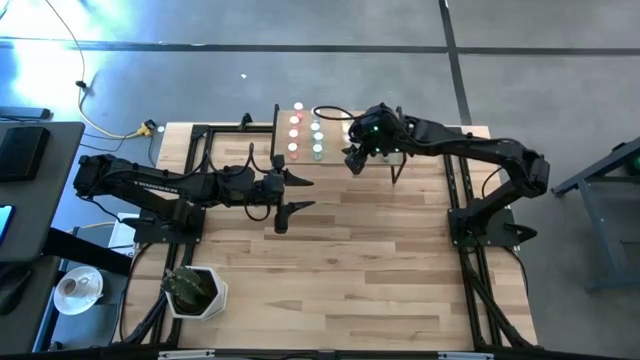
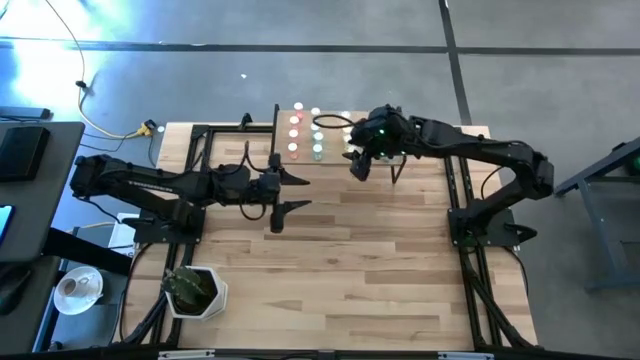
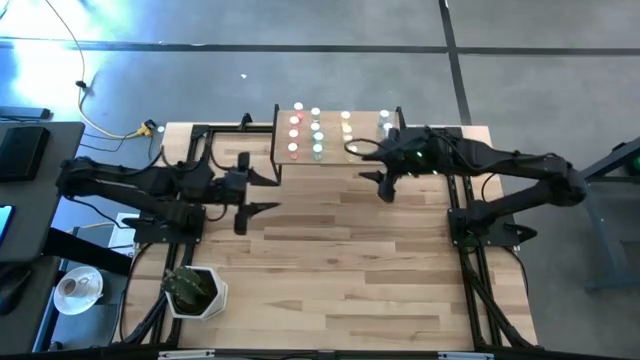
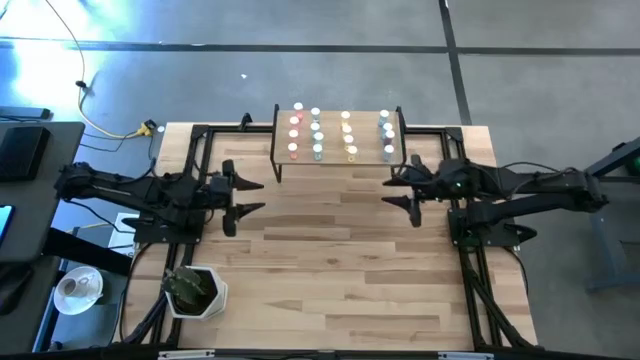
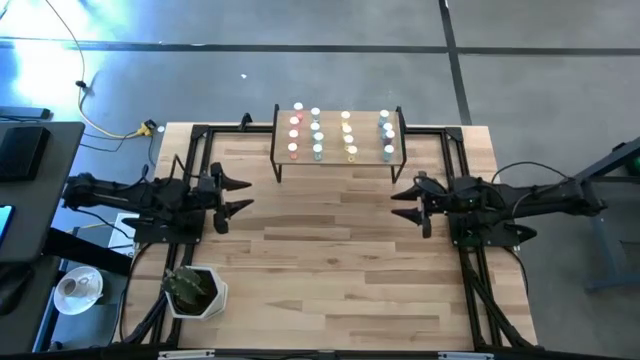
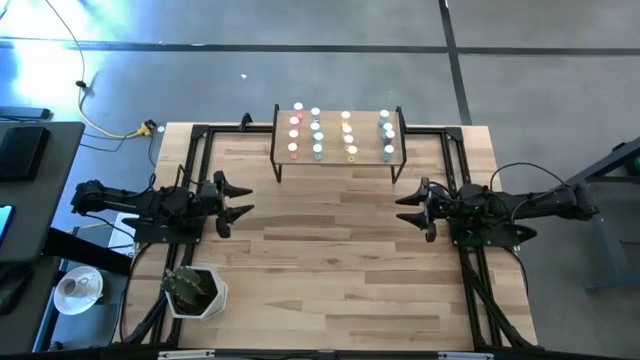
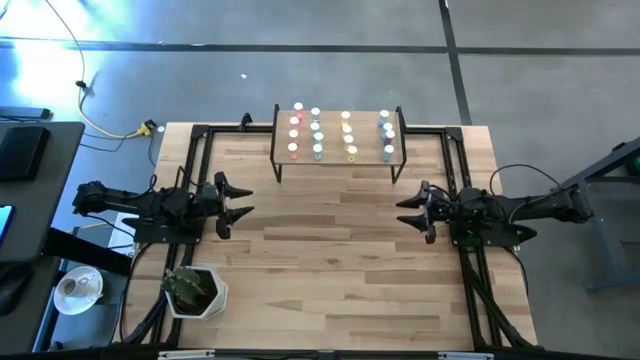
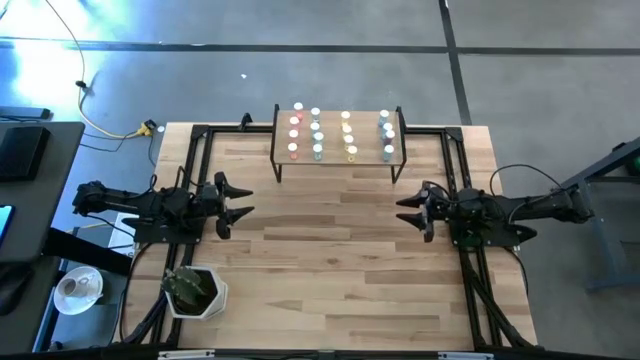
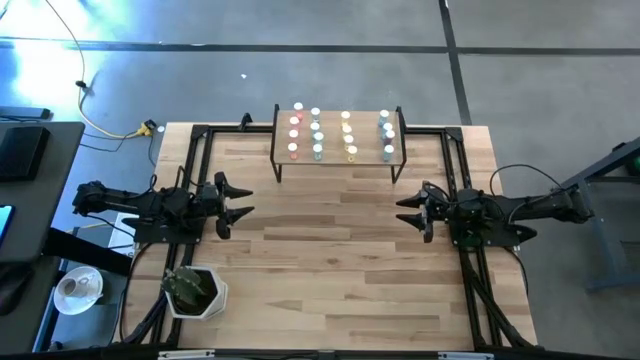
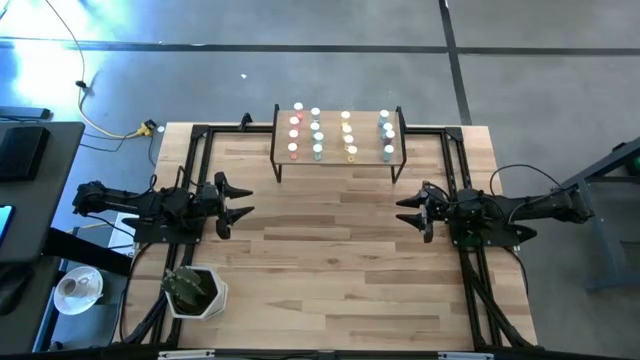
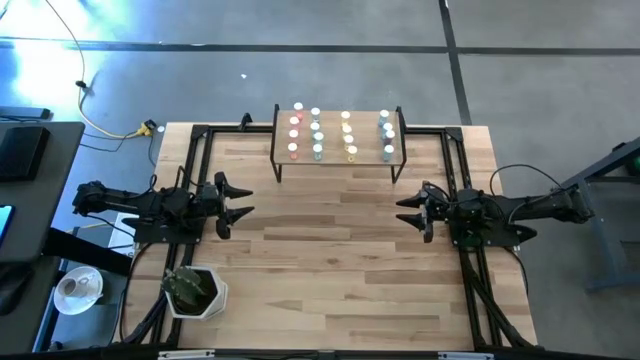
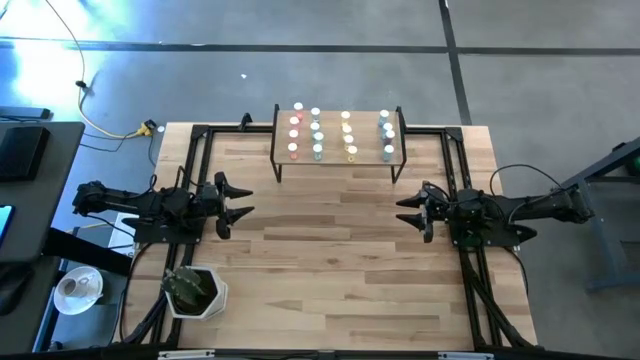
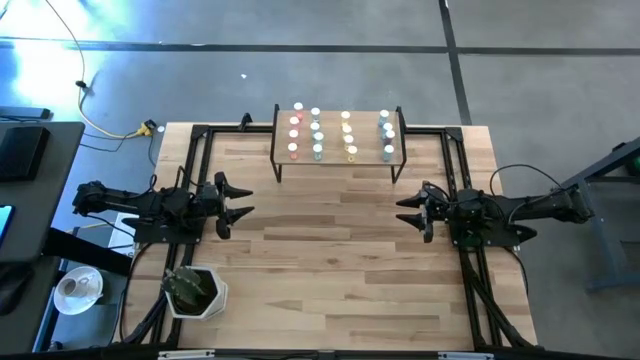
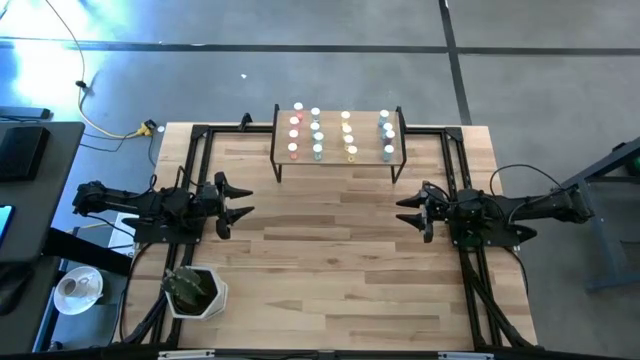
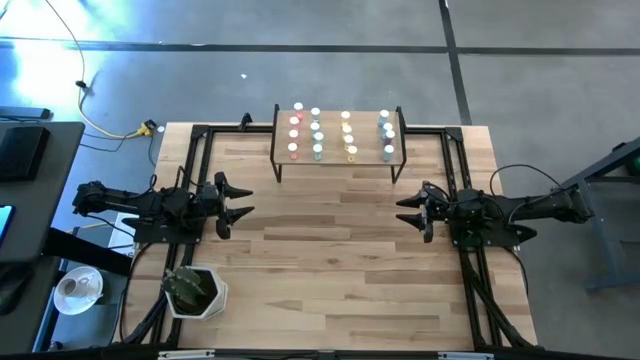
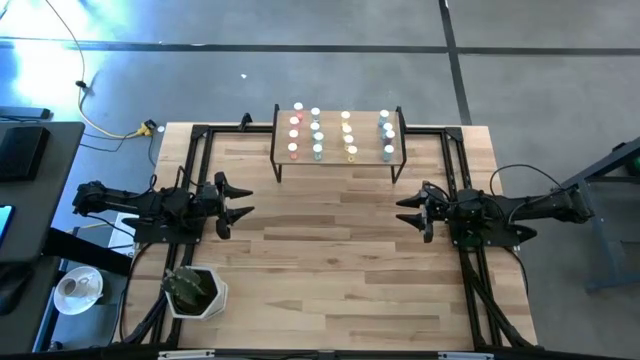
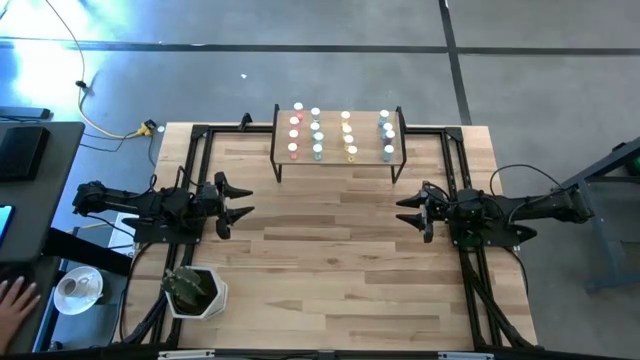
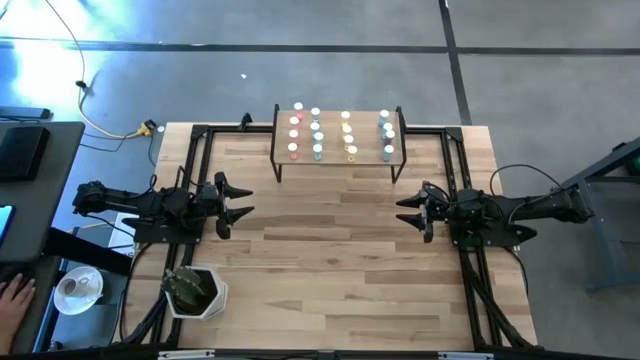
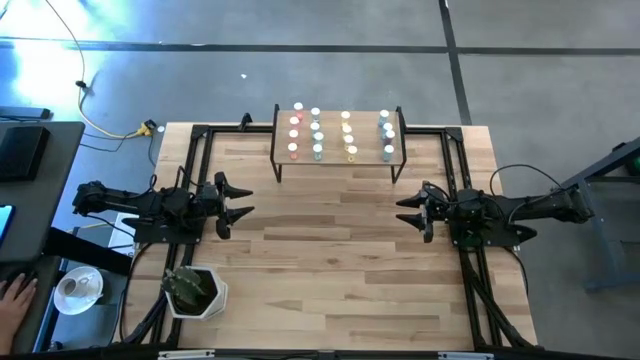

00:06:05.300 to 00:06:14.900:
Task: Pick and place medicine bottles onto shelf by color
Return to Home Position

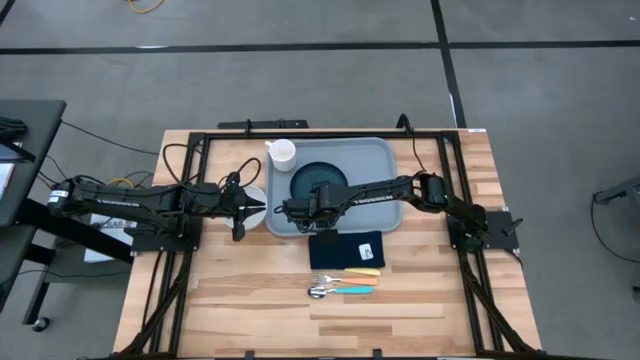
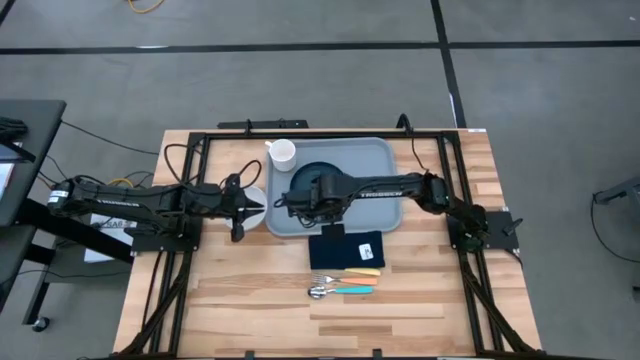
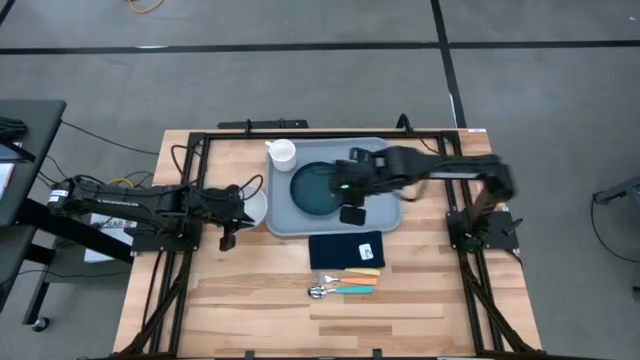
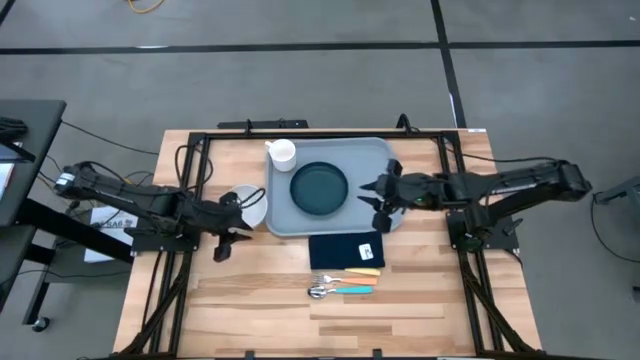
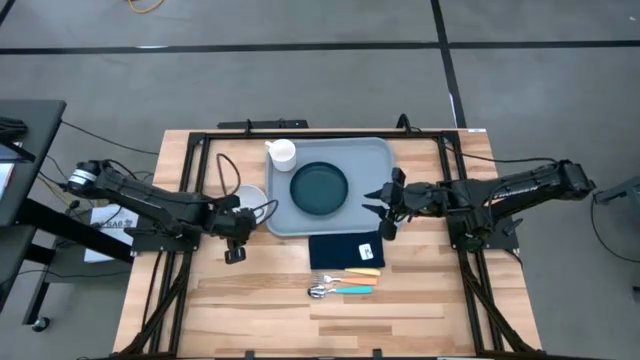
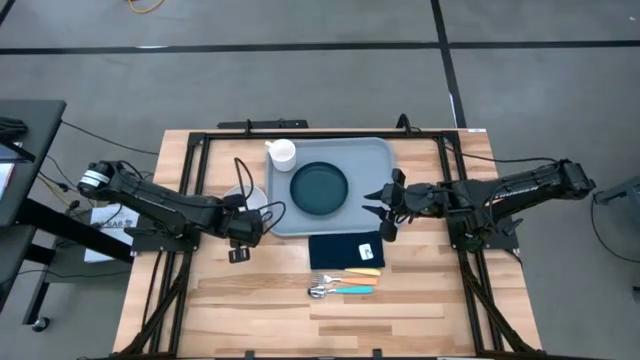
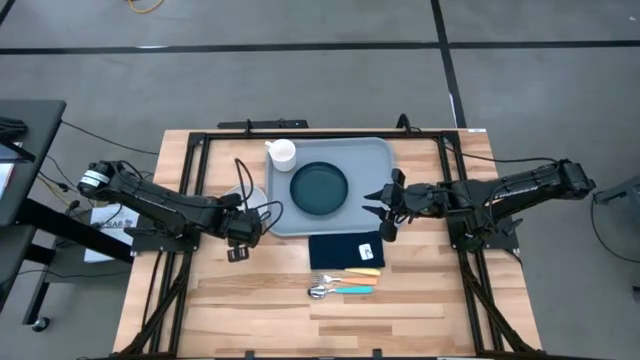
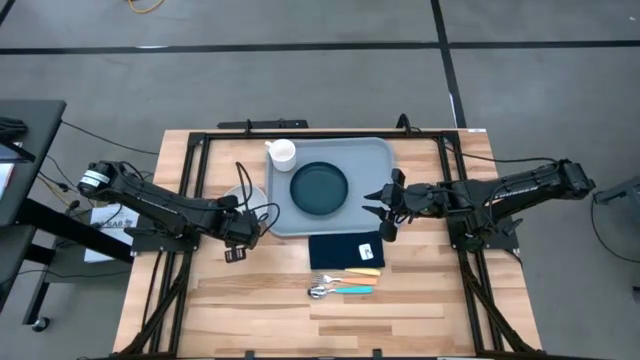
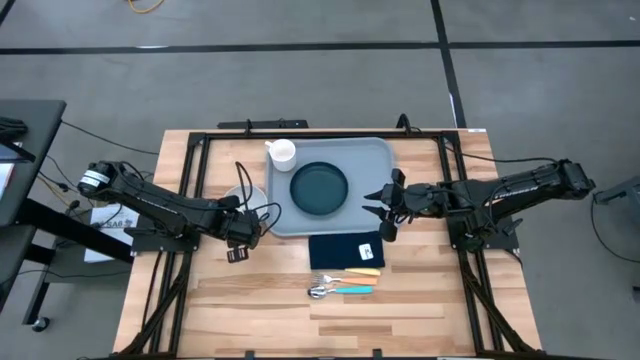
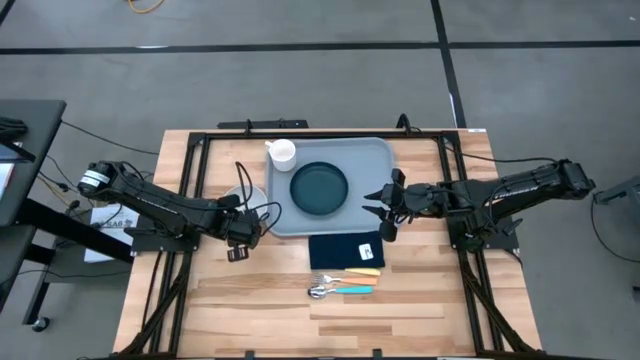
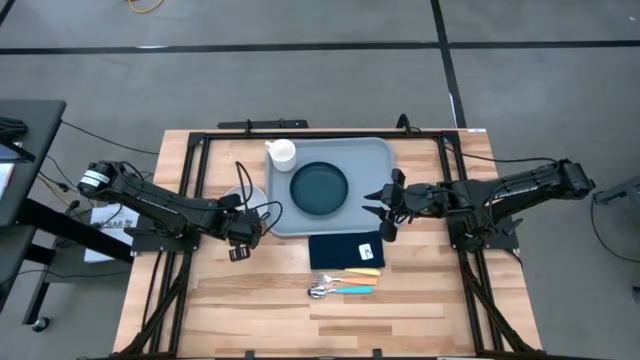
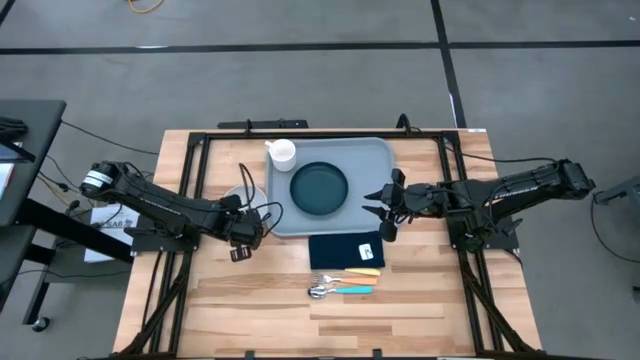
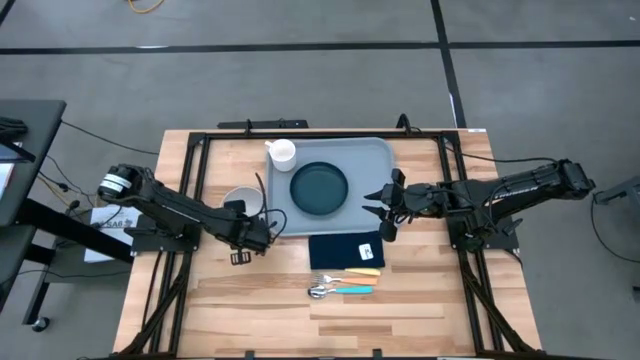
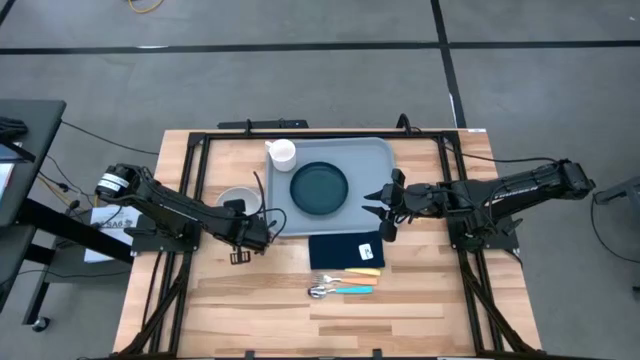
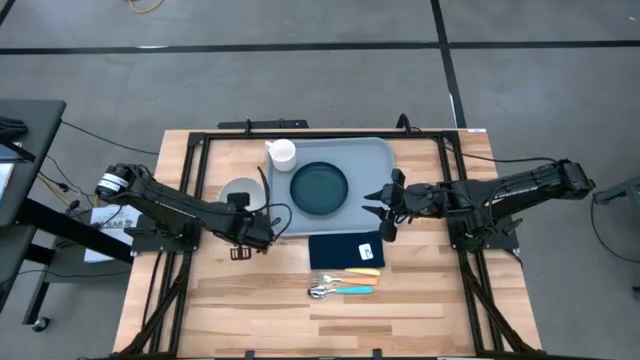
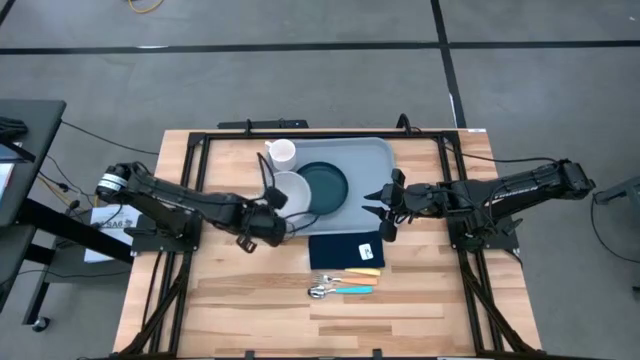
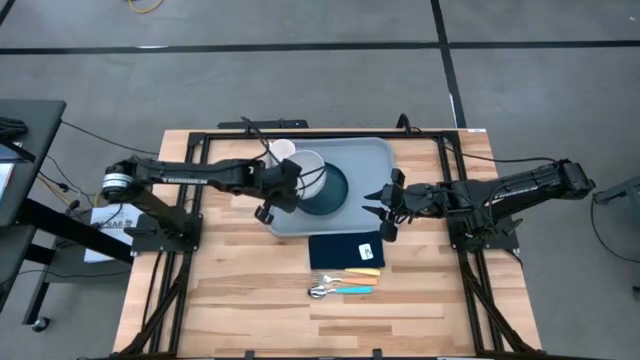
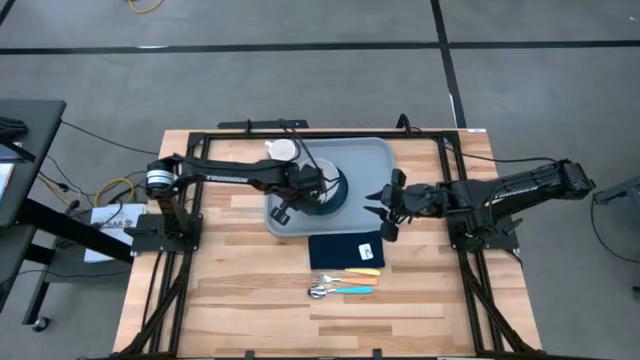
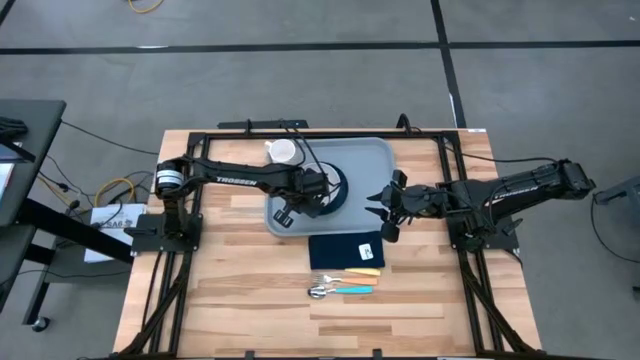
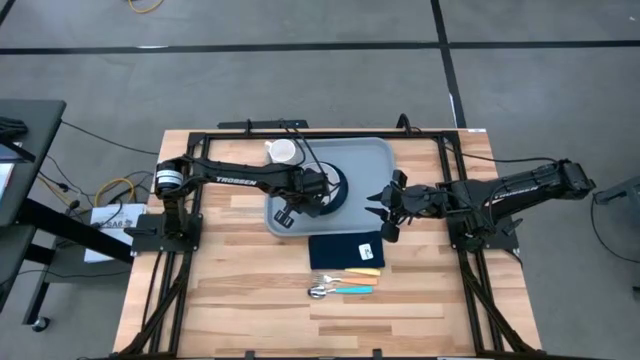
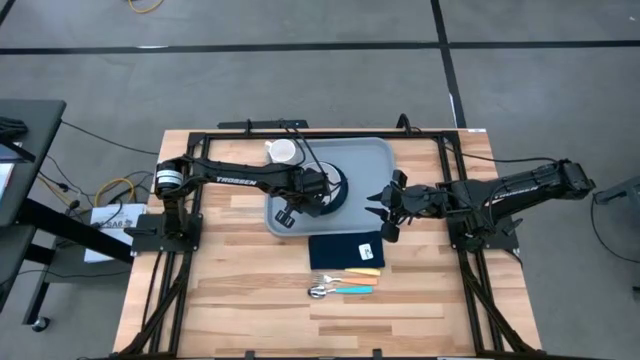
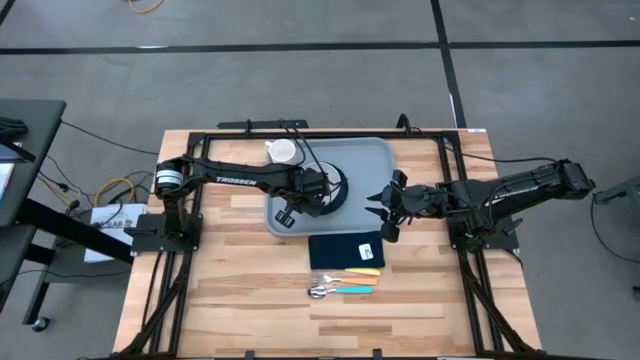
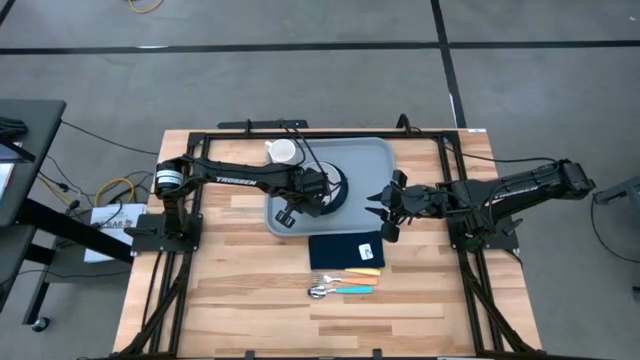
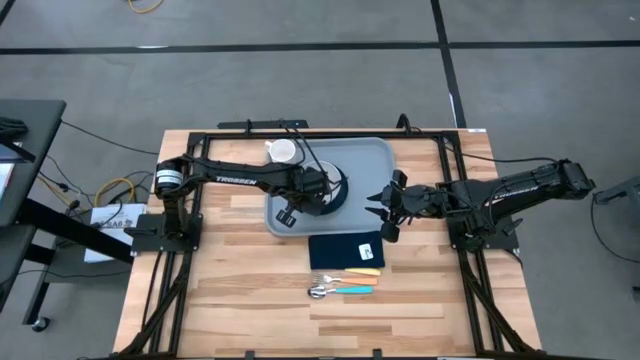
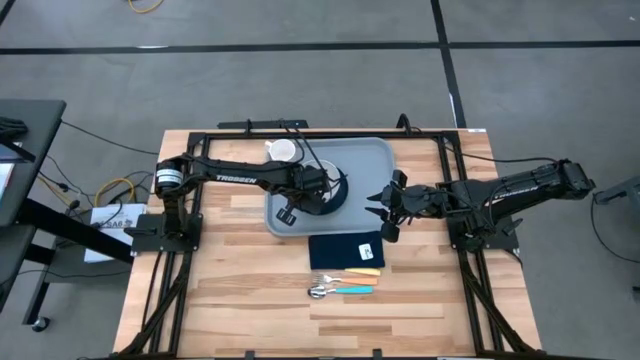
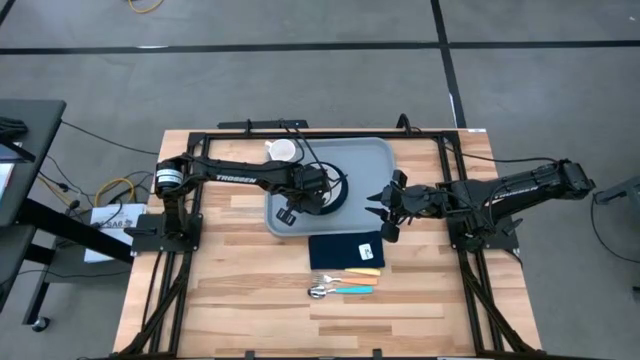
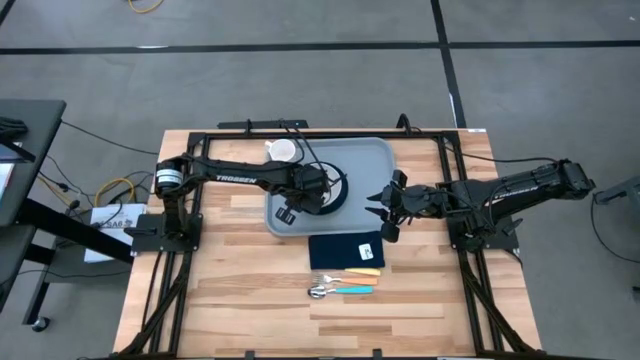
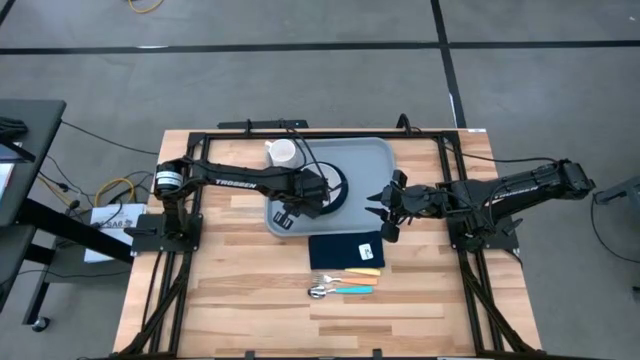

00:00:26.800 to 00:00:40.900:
Task: Set up tray
Put the white bowl on the black plate on the gray serving tray
